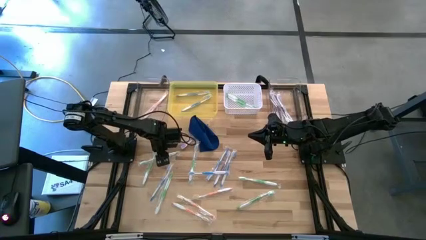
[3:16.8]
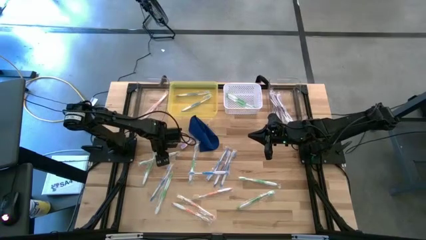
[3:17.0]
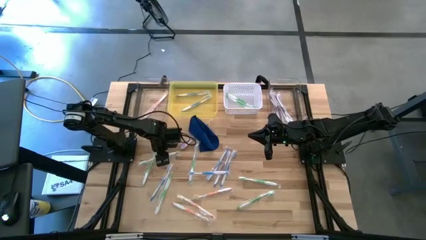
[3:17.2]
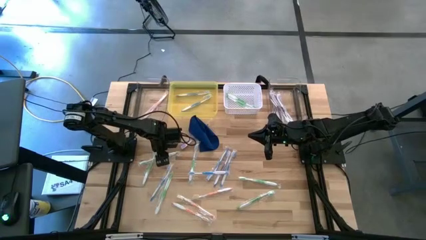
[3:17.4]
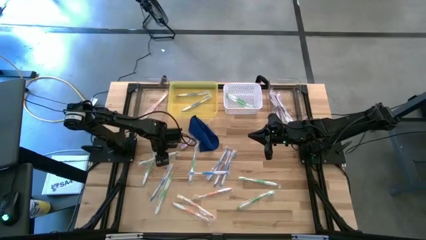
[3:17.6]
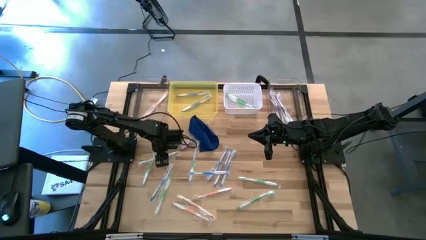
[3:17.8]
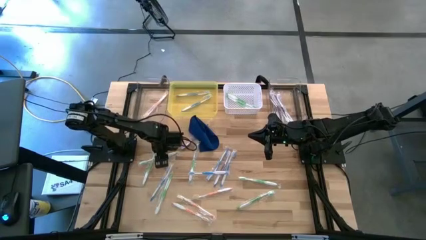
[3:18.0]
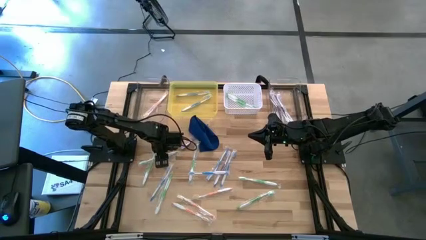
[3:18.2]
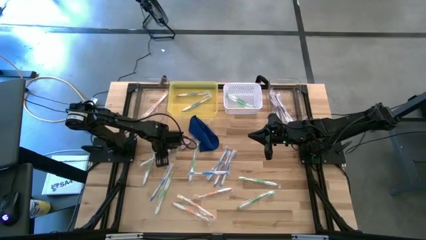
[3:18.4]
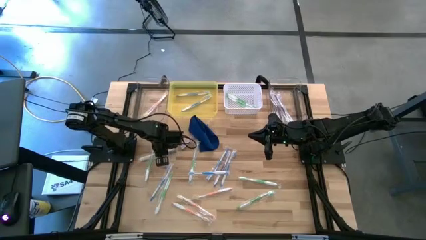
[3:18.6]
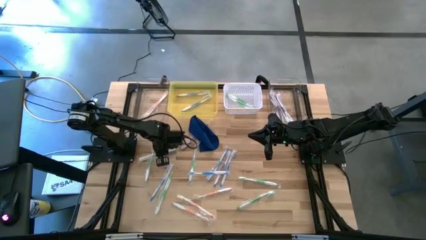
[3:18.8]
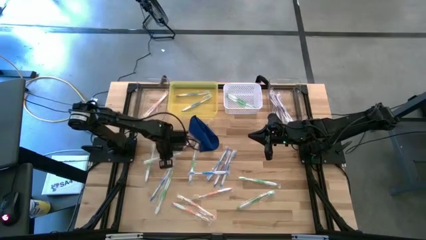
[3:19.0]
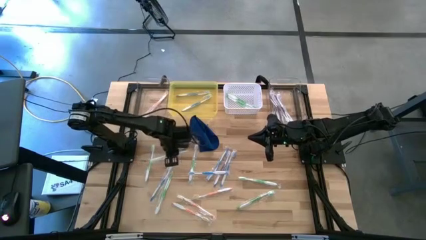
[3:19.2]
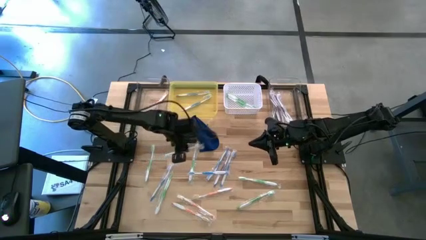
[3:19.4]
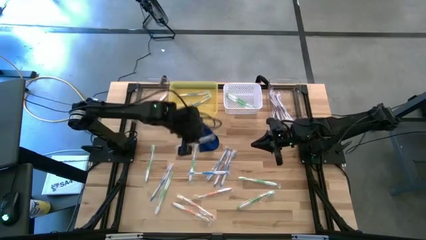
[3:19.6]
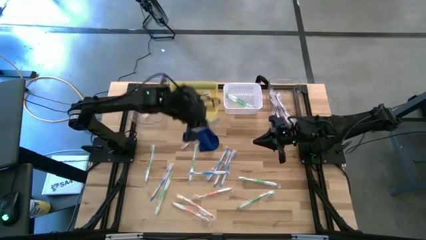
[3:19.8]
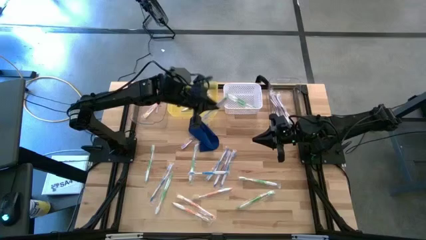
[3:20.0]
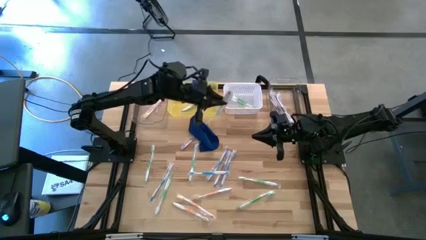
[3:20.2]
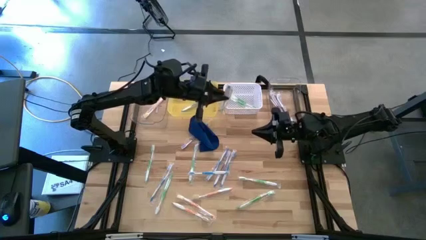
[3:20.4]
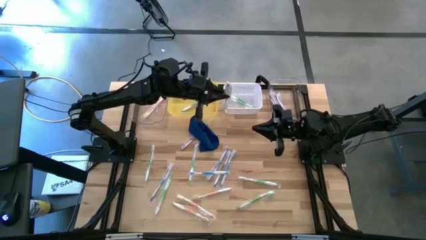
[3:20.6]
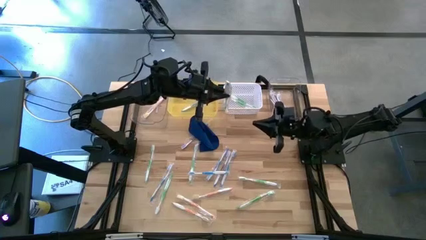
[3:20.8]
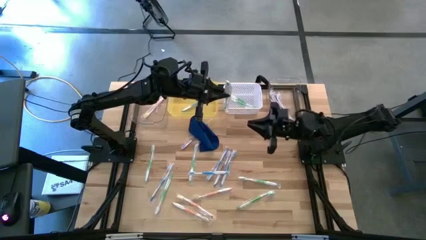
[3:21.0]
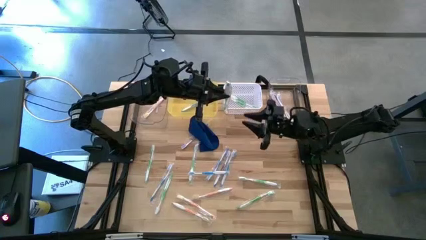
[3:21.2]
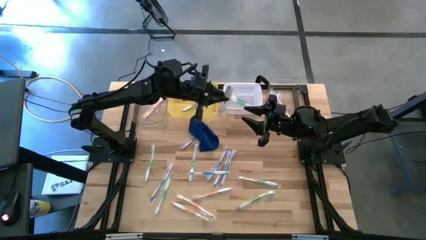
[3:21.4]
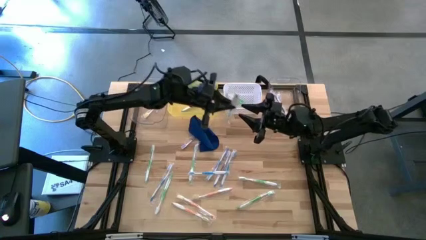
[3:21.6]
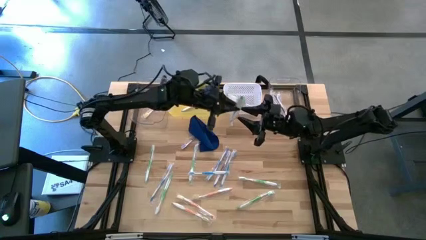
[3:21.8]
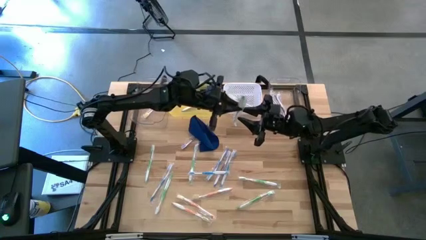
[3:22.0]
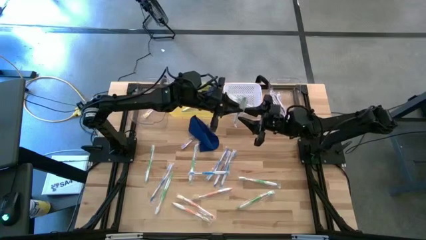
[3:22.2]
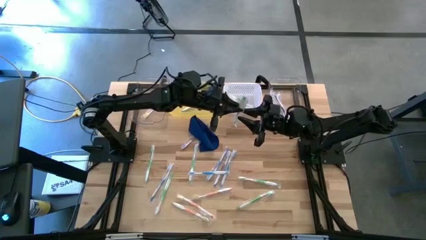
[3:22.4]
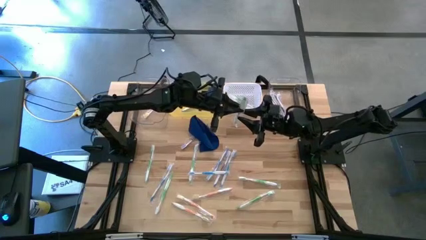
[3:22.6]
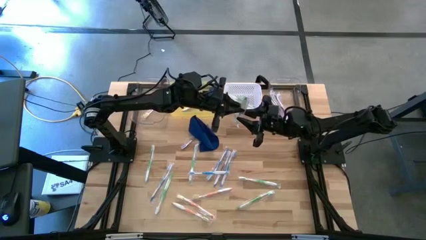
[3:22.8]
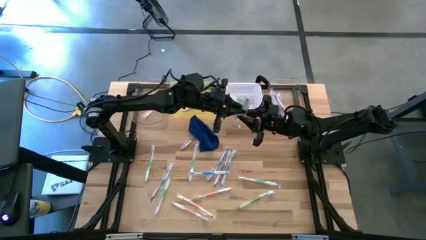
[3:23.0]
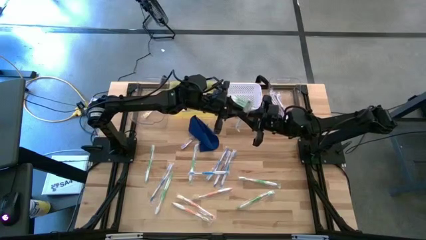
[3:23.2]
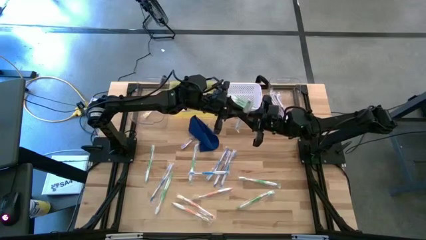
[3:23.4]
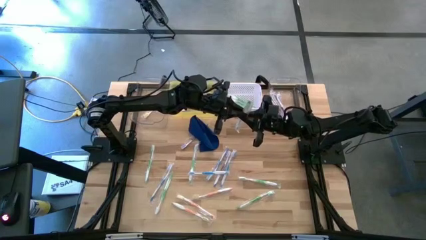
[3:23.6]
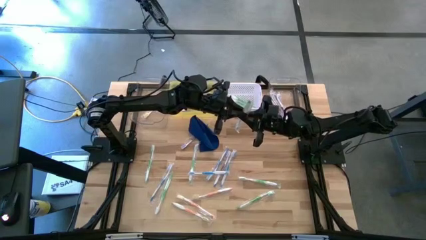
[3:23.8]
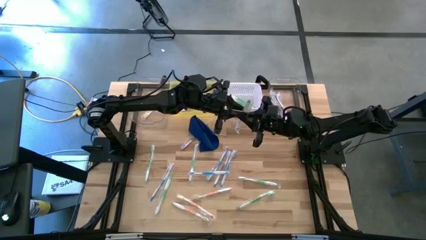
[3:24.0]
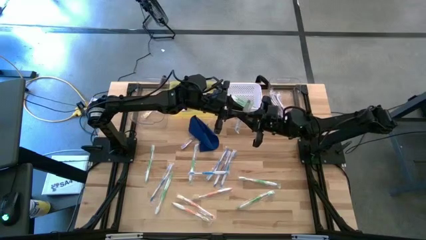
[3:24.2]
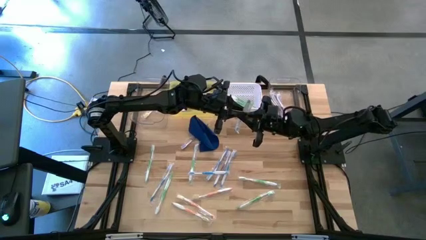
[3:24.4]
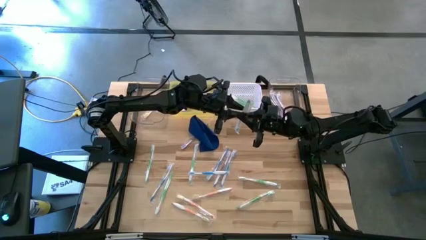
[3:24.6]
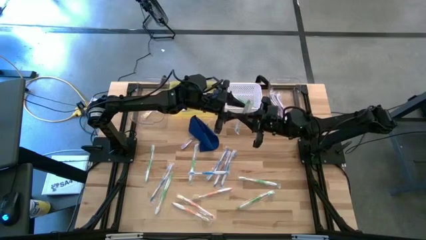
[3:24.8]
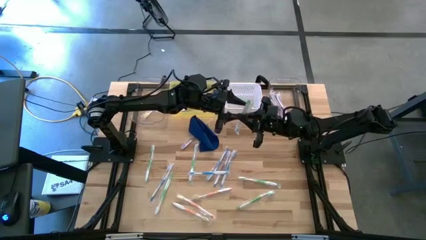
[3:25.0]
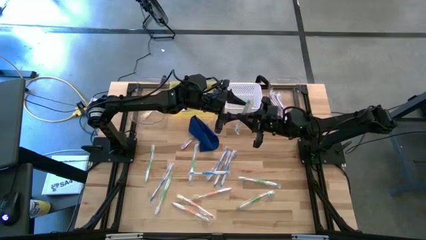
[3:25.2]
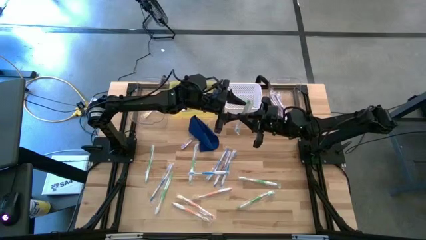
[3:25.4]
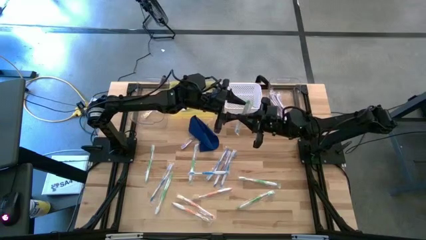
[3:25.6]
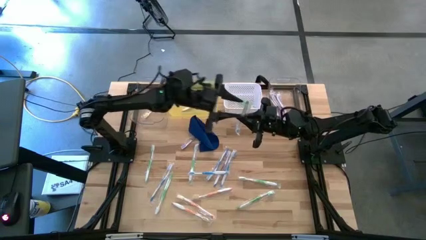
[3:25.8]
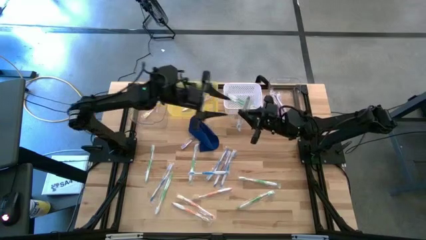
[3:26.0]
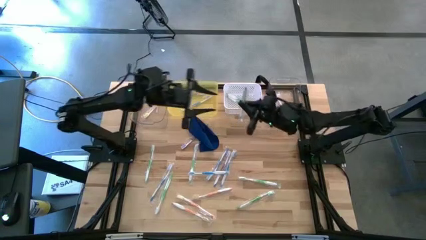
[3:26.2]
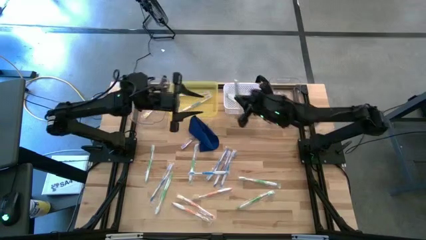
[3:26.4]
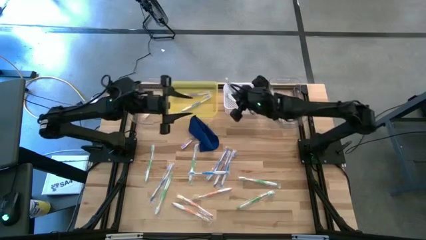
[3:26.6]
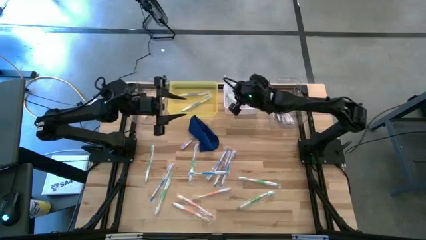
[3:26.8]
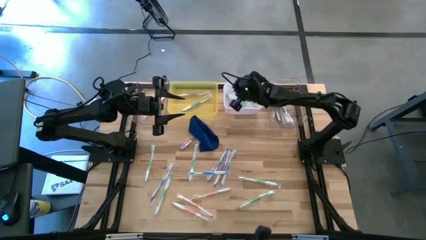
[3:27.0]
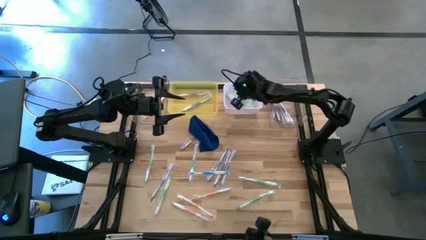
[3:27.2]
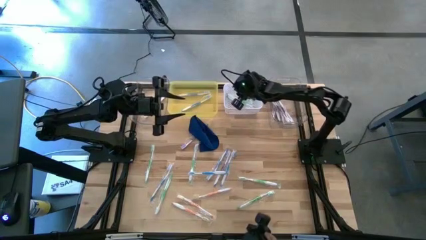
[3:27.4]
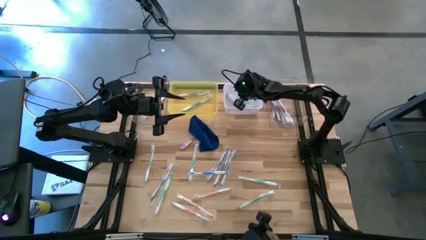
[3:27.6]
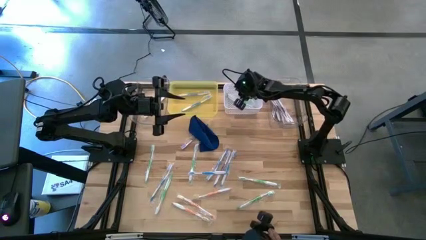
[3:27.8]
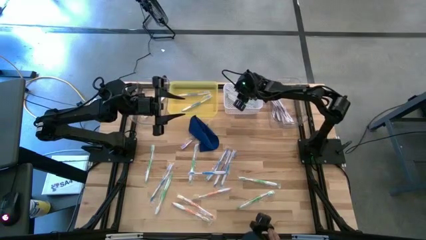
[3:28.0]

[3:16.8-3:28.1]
Task: Pick & Place Toothbrushes
Put the green toothbrush into the white bin

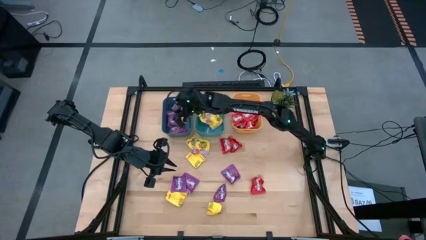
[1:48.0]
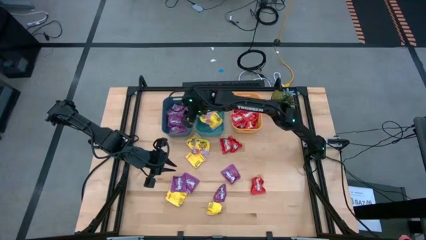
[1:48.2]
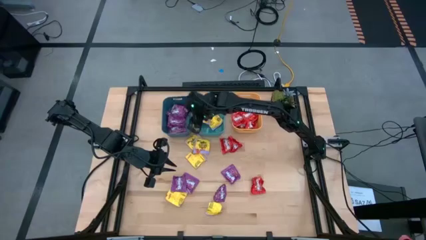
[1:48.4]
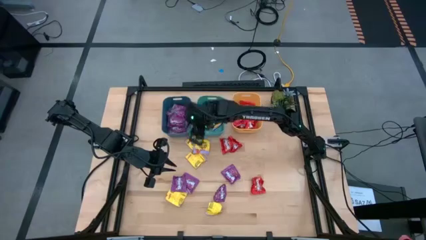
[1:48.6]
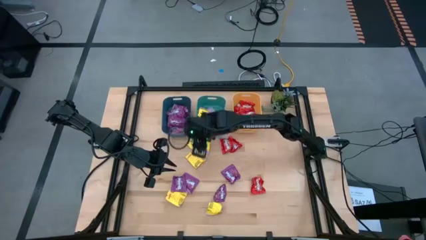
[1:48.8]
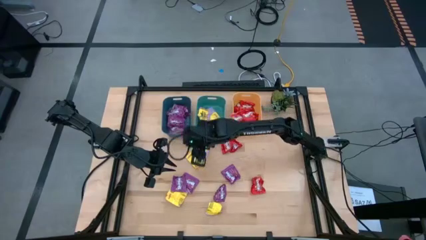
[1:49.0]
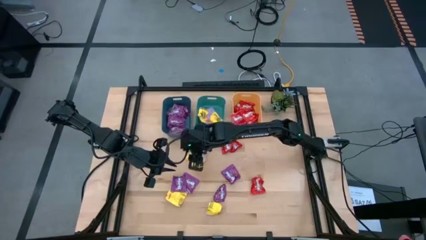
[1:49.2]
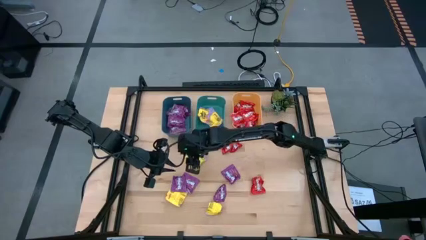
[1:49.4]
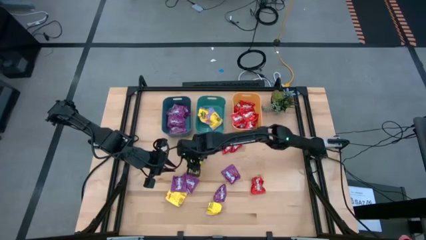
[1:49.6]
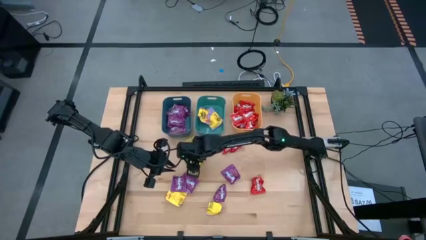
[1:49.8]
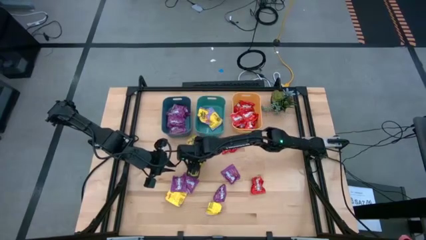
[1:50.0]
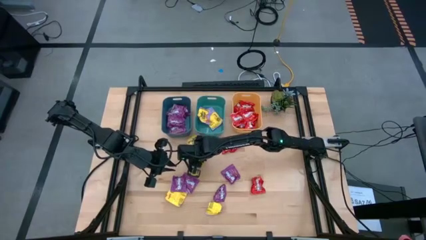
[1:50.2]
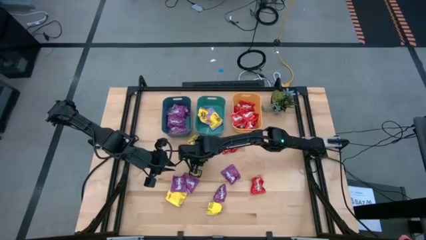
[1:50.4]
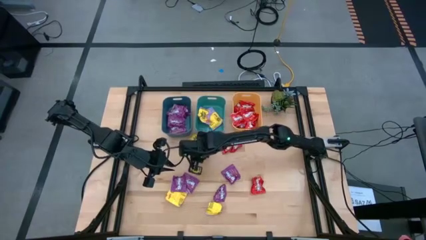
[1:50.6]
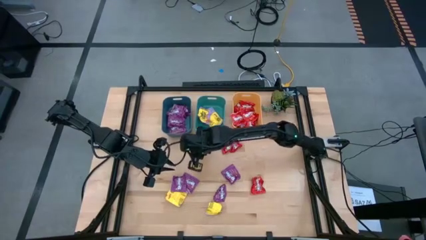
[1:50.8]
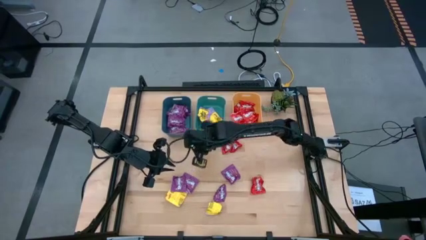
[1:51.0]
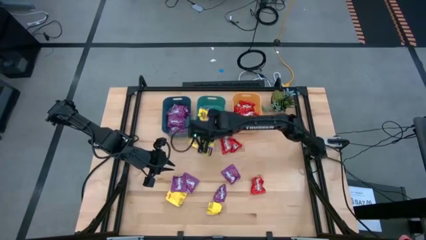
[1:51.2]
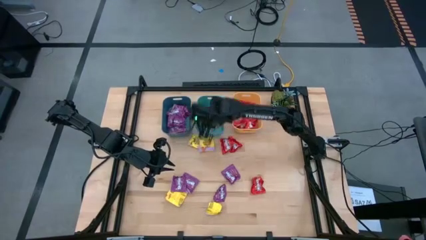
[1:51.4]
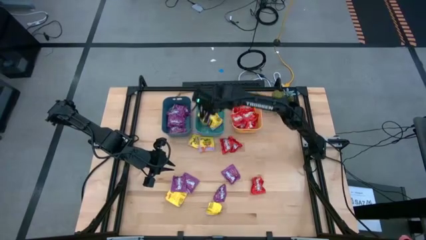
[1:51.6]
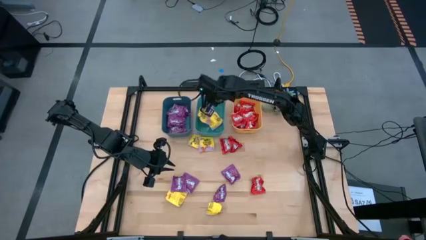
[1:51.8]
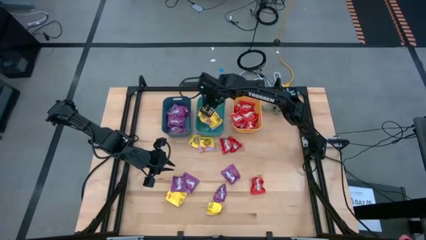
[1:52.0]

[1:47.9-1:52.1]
Task: Sort candy
Put the yellow candy into the green bin

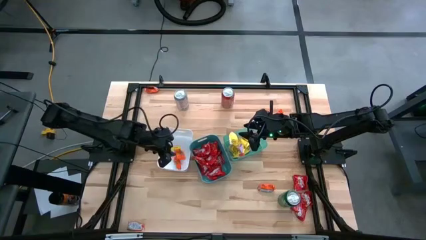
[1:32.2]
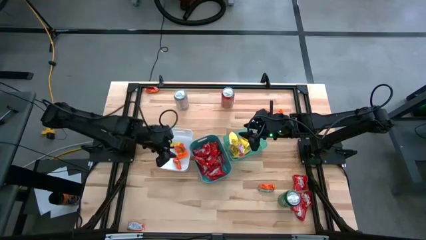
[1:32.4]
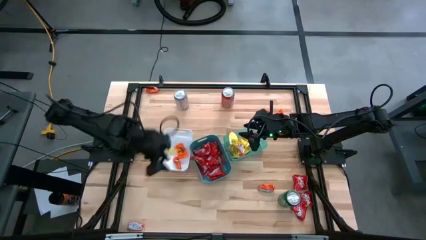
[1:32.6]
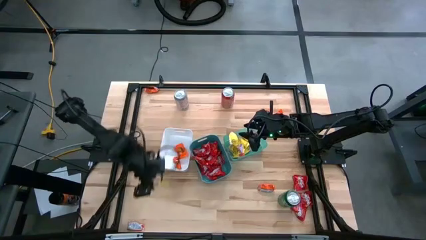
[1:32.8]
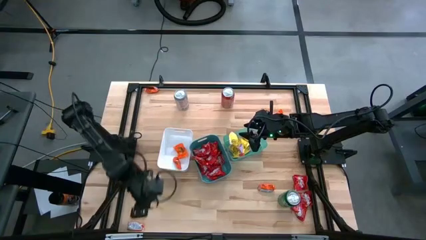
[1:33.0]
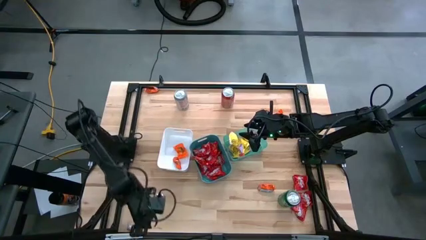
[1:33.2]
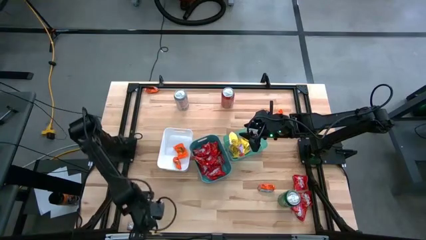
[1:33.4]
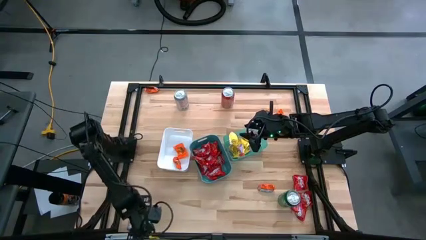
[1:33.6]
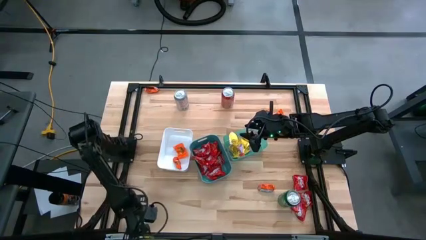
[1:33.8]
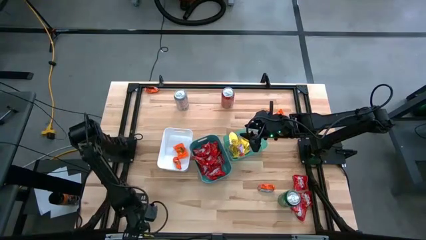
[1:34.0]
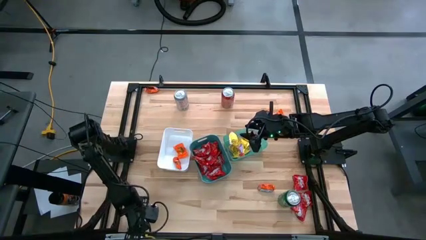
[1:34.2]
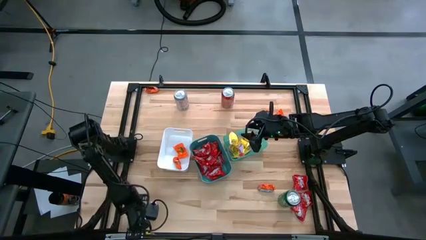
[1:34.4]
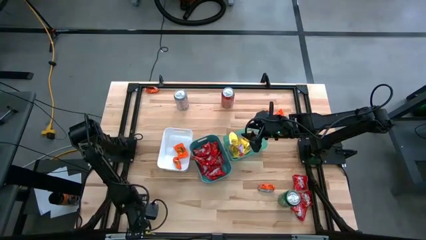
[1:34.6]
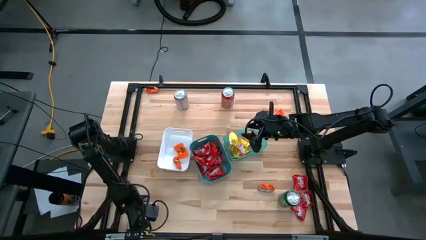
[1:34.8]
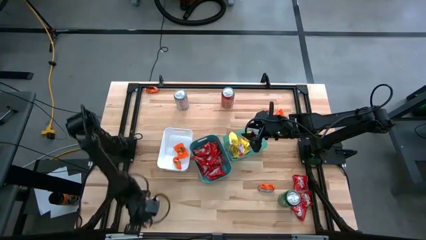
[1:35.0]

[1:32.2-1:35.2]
Task: Sort candy
Put the orange chocolate into the white bin
